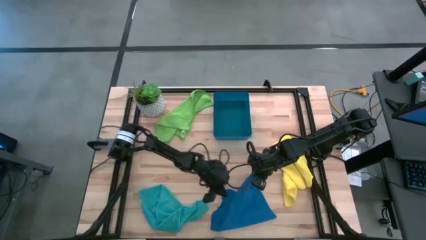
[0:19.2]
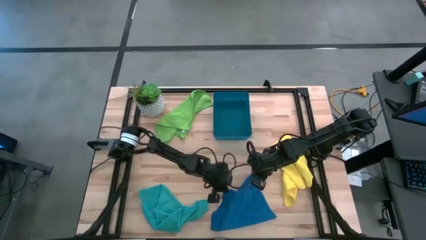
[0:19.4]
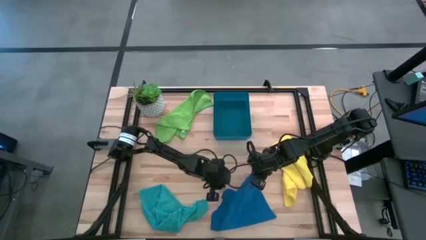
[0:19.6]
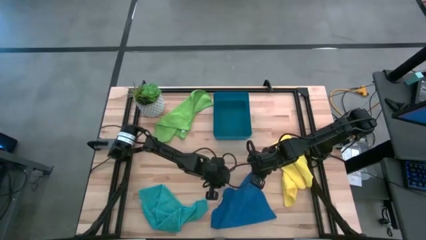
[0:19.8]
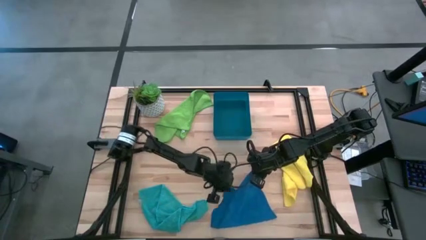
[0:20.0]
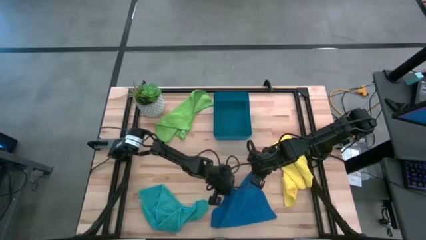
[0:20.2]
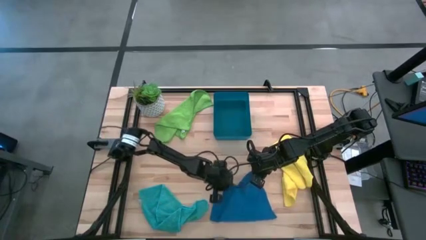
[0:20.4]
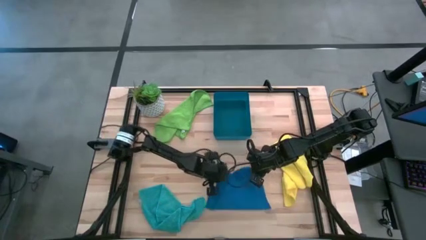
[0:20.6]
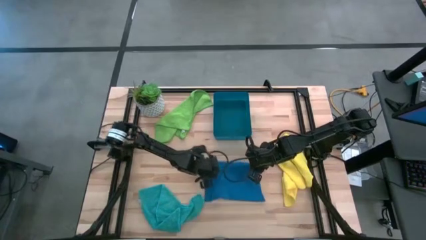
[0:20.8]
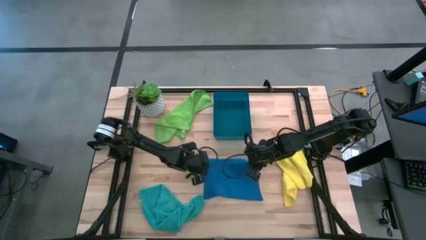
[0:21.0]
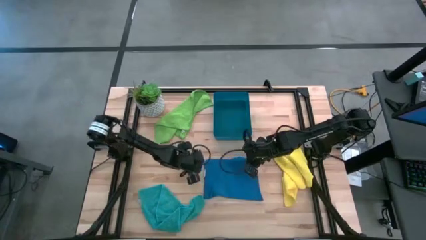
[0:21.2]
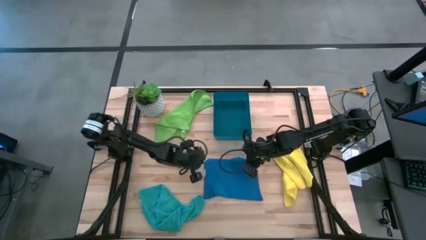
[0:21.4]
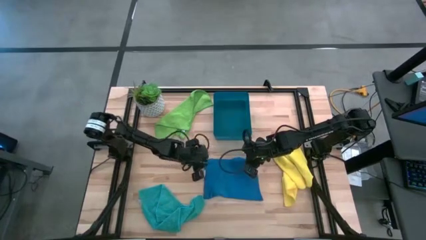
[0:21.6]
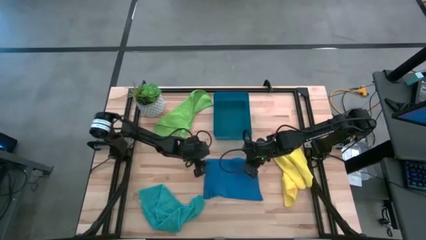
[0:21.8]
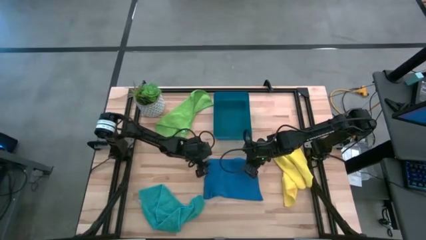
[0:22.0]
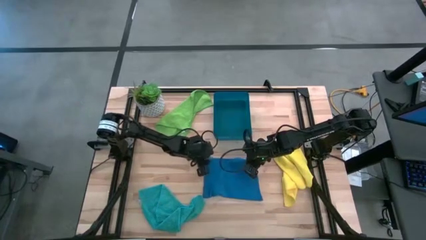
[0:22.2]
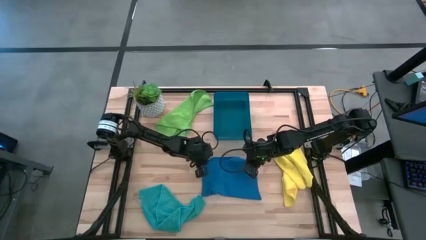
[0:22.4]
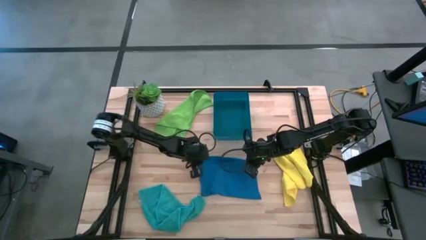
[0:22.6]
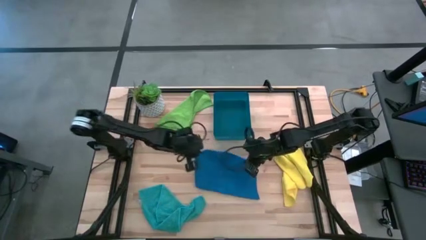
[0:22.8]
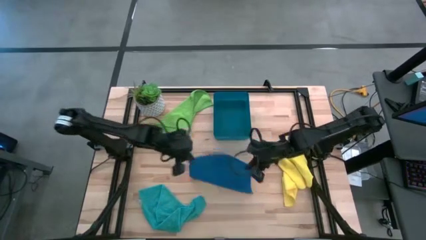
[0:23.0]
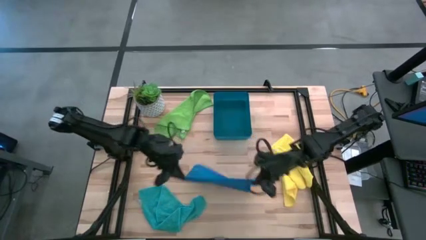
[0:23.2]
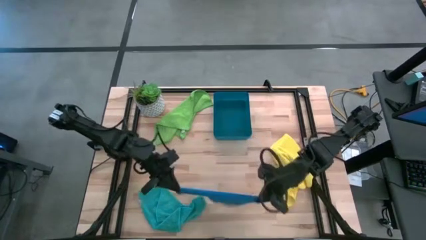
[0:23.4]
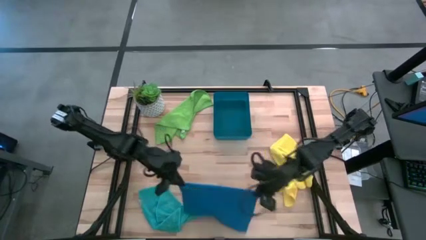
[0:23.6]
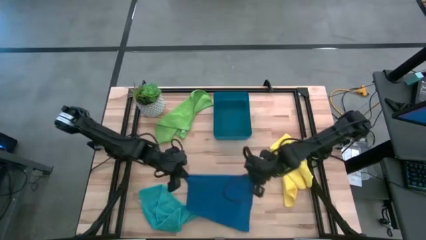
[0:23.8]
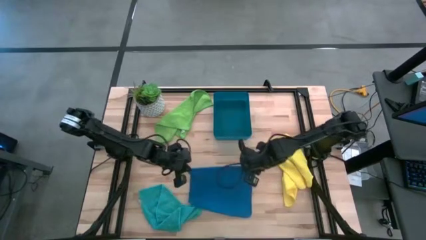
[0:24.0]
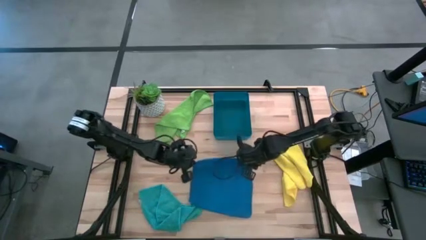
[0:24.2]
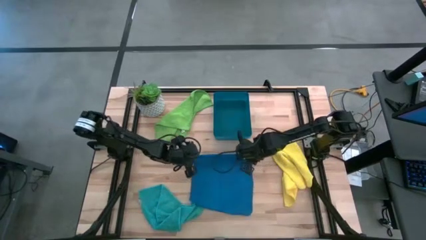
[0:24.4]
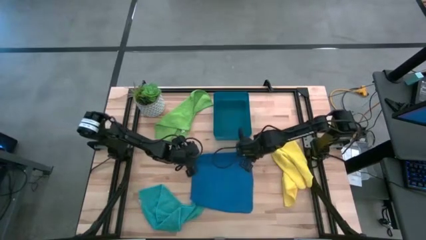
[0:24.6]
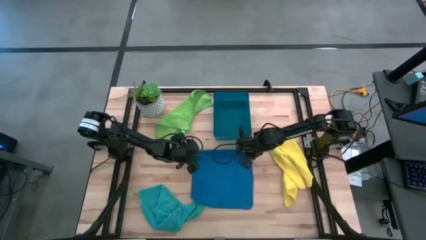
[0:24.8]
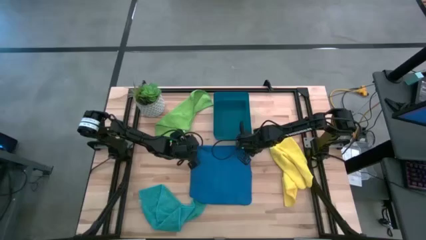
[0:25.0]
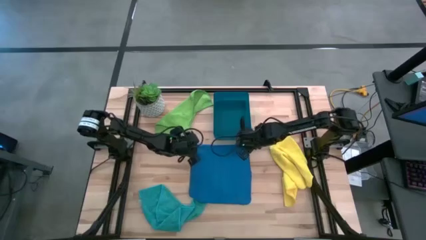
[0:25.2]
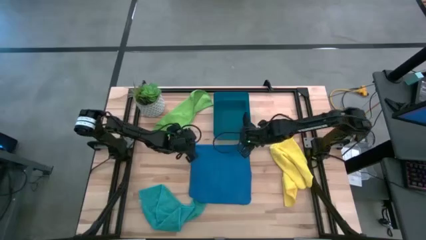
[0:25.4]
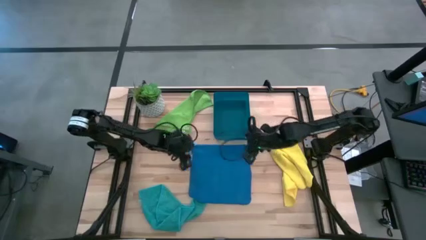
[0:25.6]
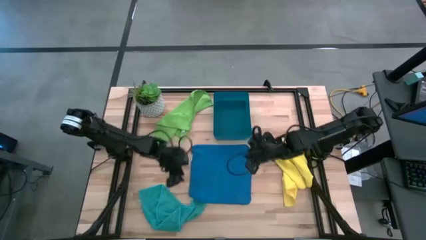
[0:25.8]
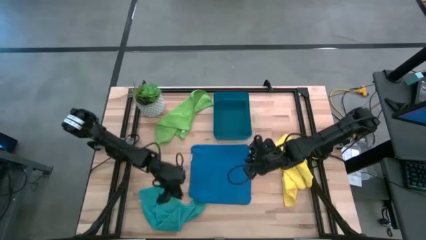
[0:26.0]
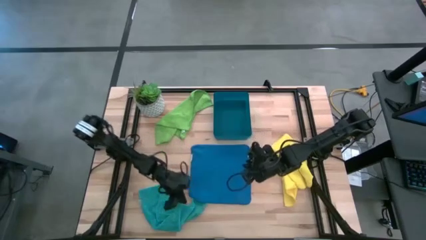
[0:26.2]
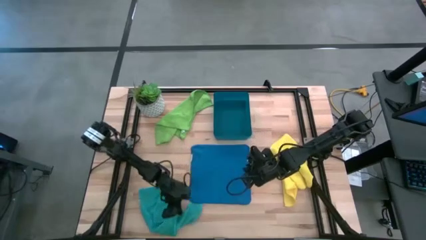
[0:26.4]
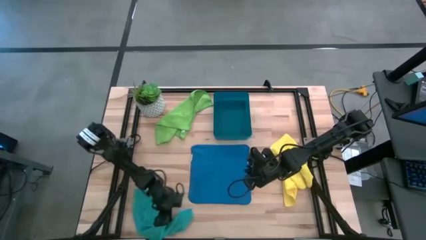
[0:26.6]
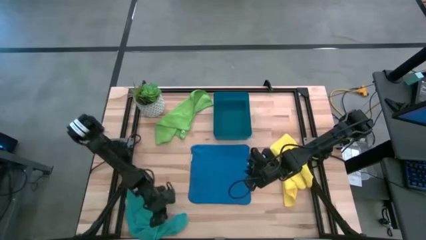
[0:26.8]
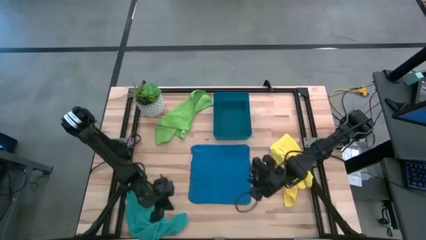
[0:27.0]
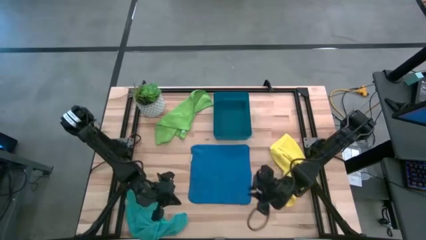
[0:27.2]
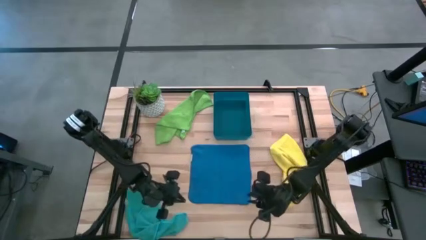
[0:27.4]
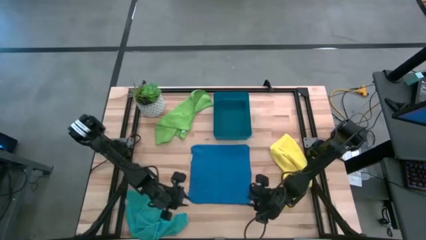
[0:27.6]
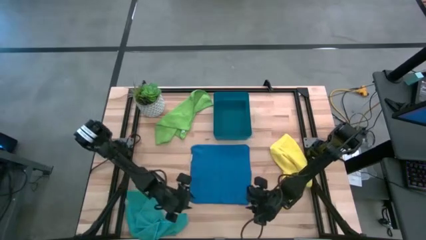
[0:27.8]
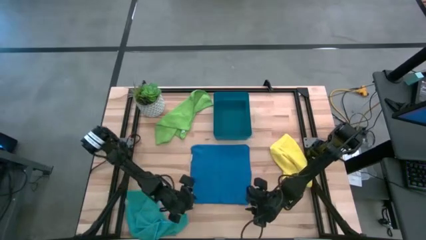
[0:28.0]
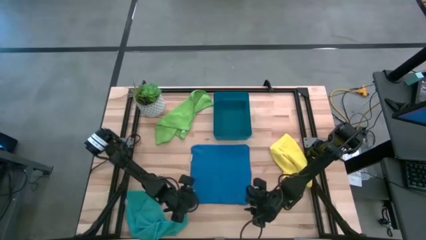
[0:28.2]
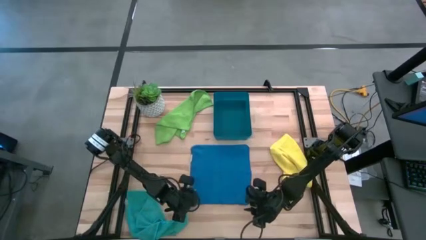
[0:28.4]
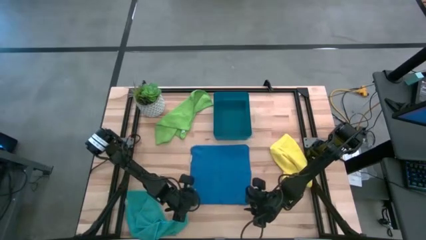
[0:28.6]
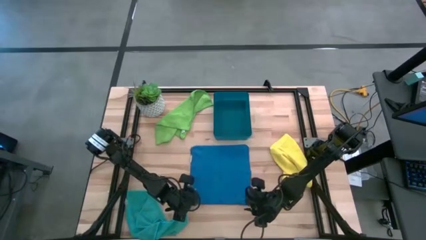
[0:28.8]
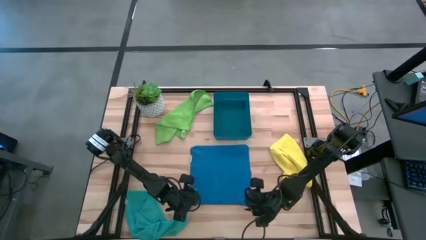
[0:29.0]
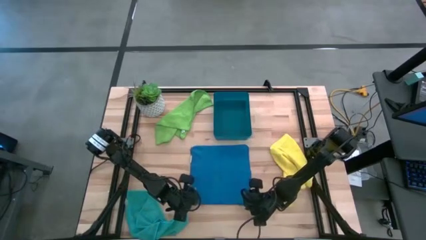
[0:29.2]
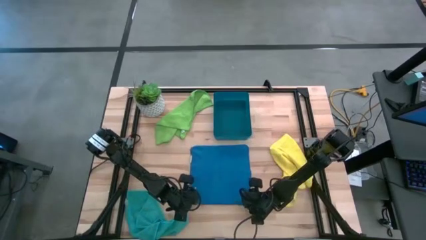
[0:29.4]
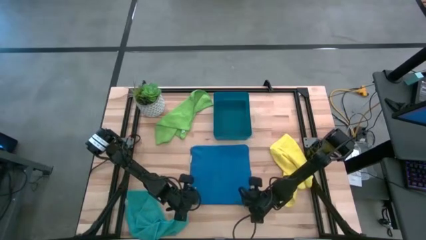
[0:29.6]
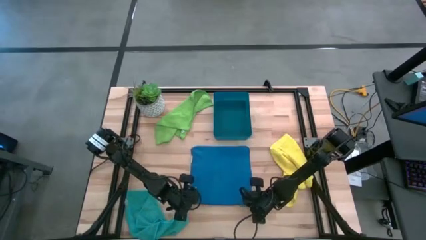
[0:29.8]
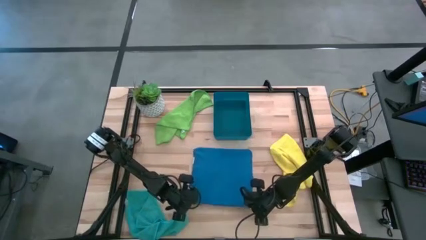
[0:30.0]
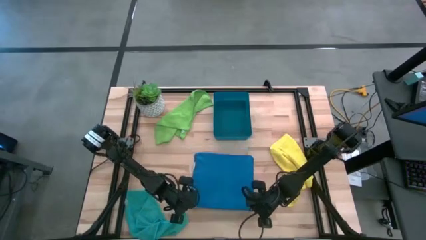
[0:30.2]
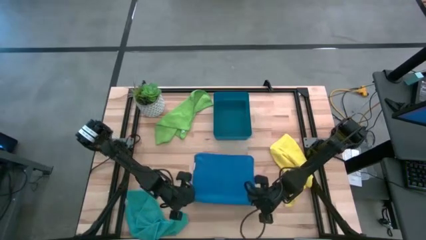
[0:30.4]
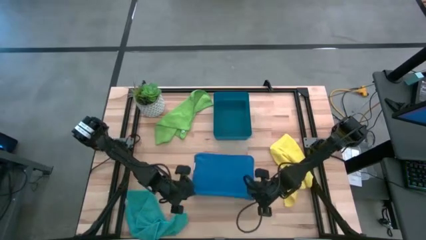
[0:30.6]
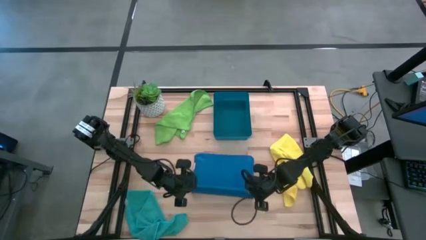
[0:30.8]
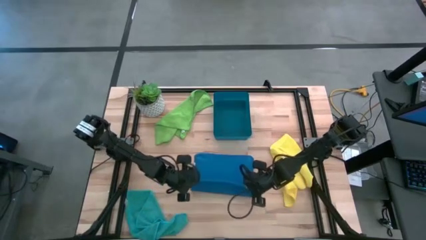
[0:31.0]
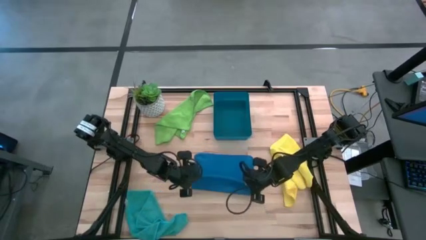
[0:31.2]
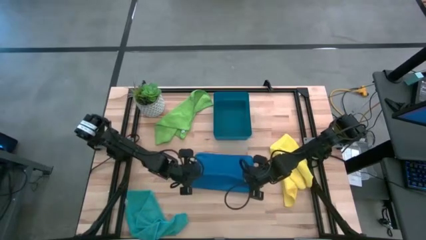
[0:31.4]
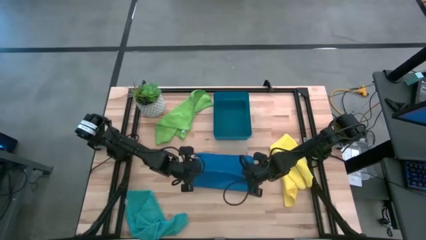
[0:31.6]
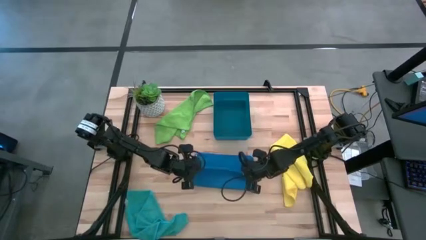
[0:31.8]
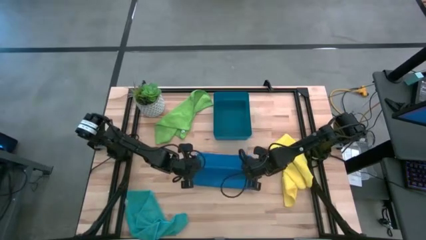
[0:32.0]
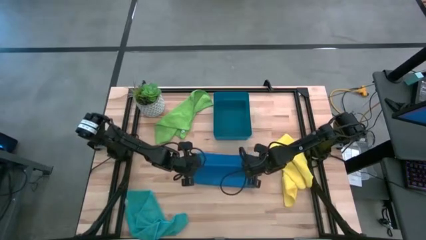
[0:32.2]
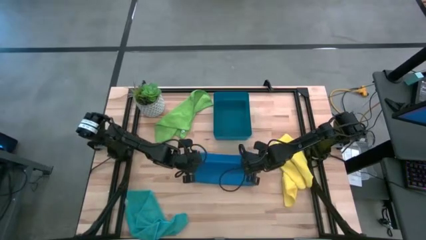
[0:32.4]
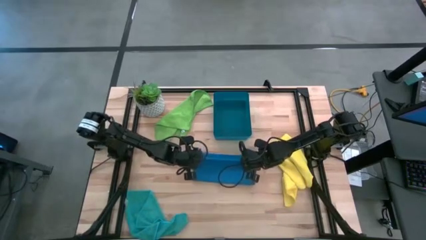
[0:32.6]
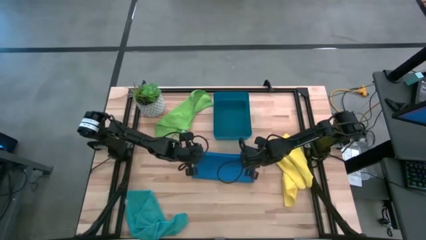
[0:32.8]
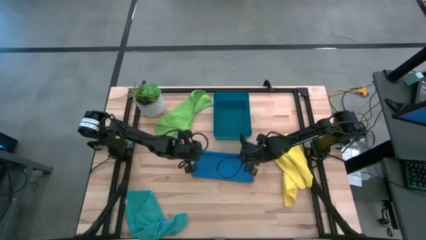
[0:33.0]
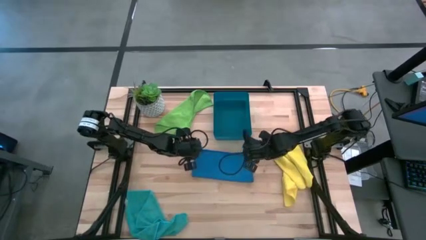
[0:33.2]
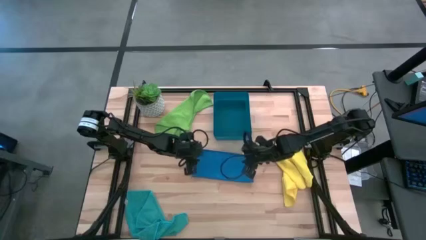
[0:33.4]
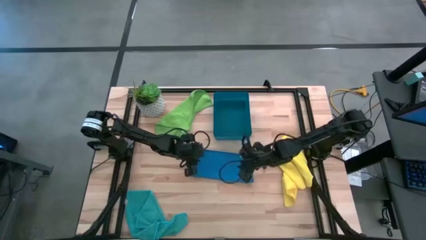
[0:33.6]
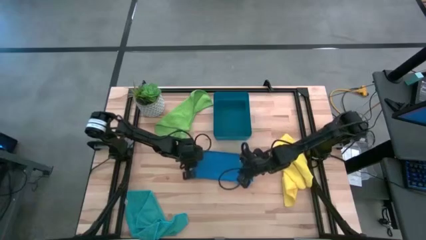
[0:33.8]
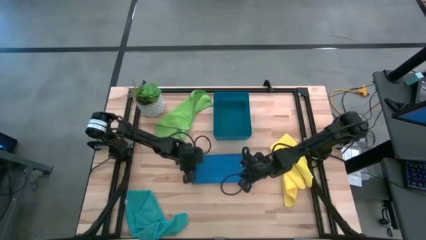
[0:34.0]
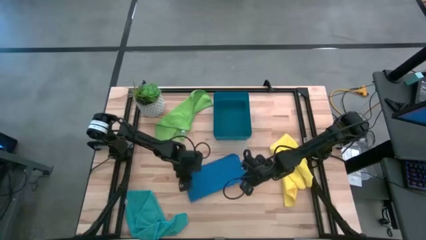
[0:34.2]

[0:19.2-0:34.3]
Task: Fold microfiber towels
Fold the blue microfiber cloth
